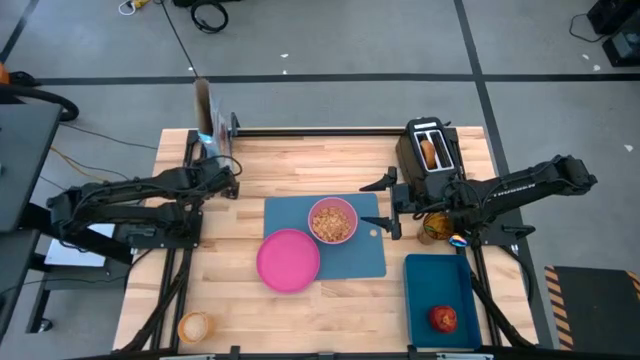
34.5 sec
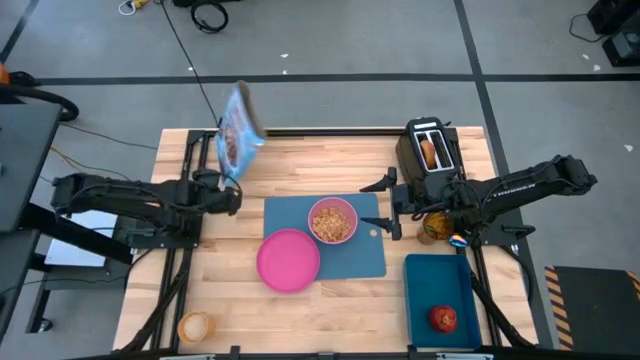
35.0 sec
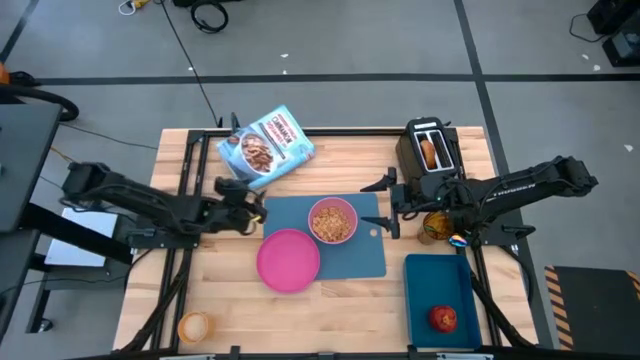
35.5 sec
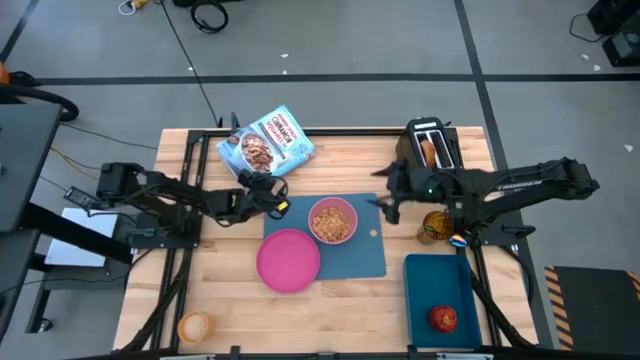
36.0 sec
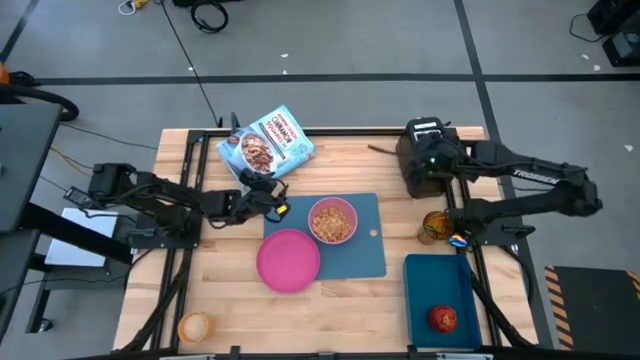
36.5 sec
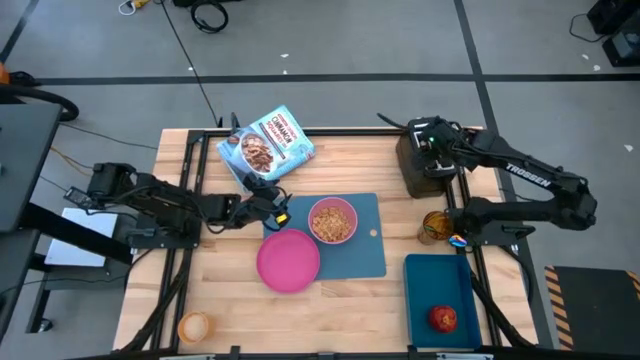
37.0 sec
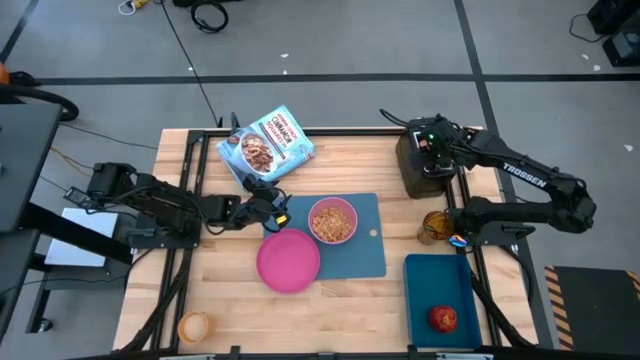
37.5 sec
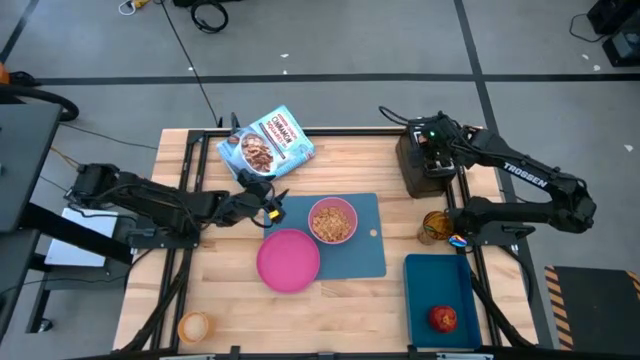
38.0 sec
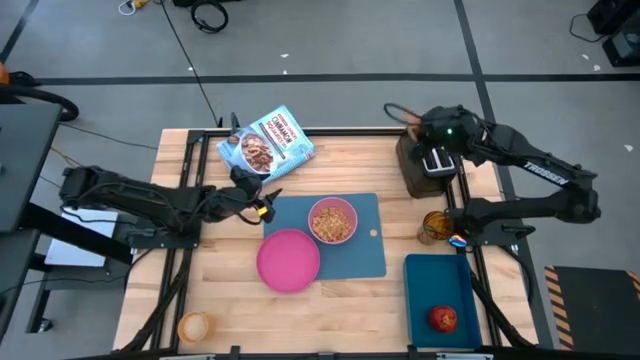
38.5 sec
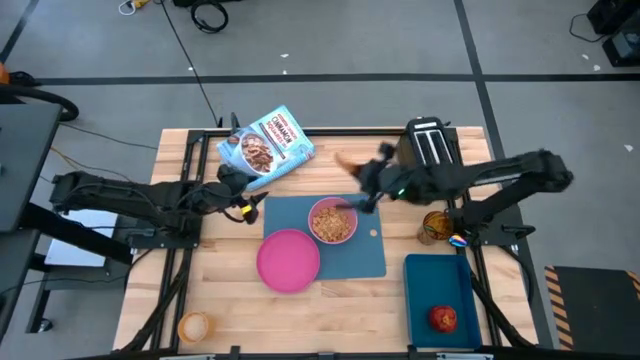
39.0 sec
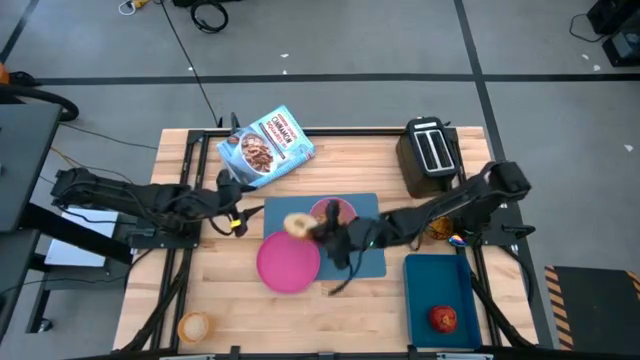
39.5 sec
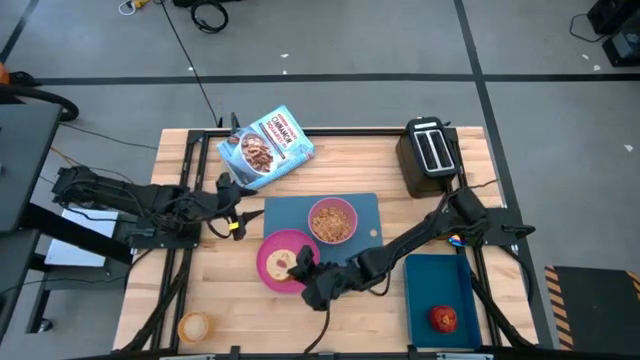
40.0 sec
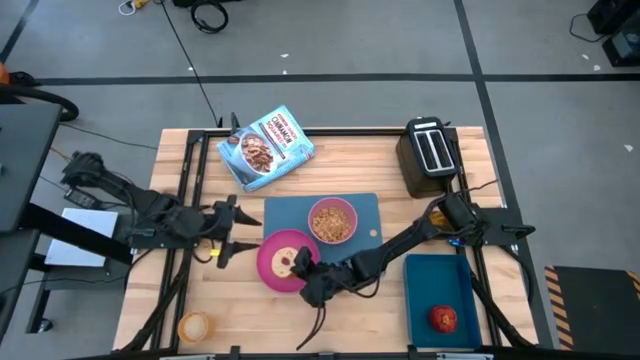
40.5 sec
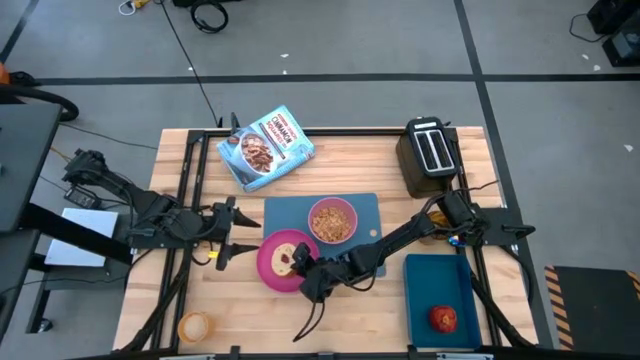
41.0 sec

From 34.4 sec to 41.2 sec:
Task: Arrange a breakfast setting
Put the toasted bread on the pink plate

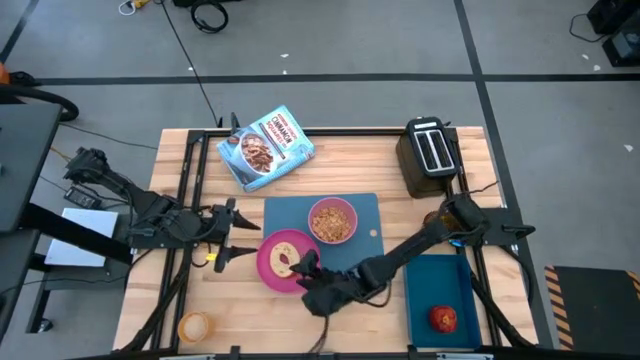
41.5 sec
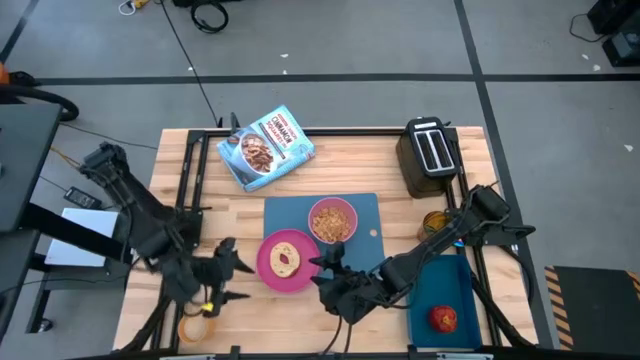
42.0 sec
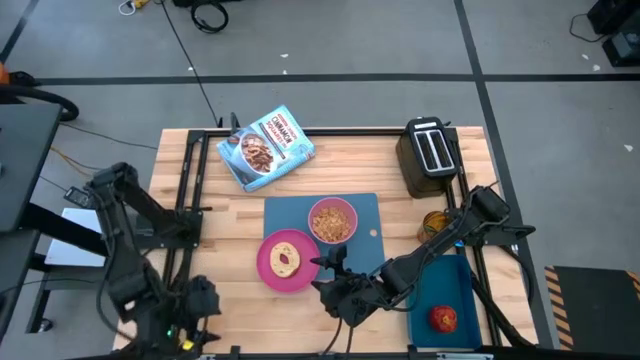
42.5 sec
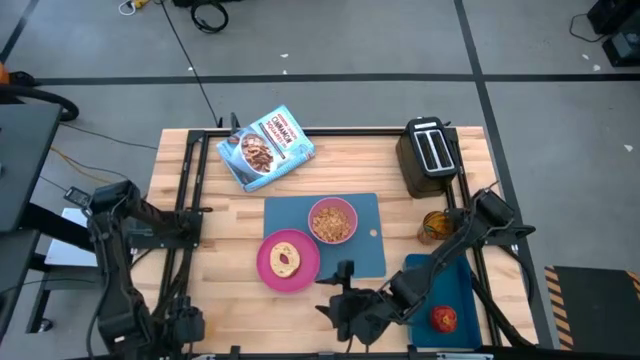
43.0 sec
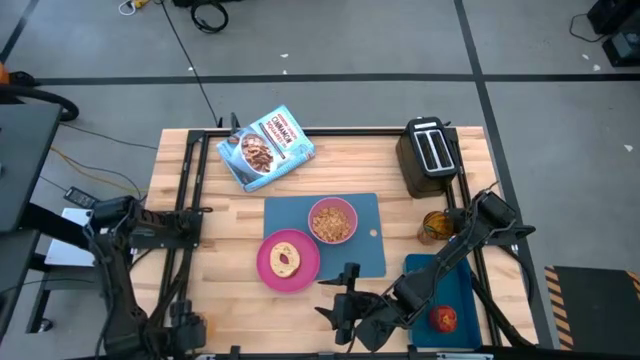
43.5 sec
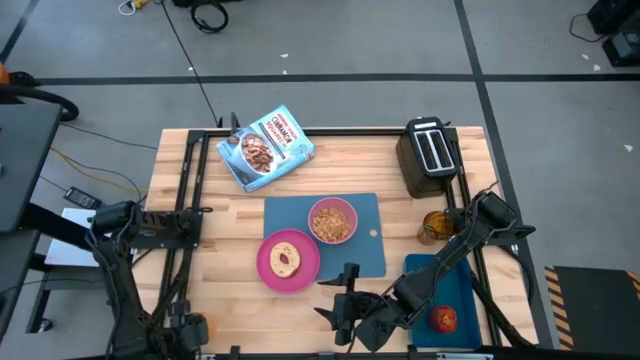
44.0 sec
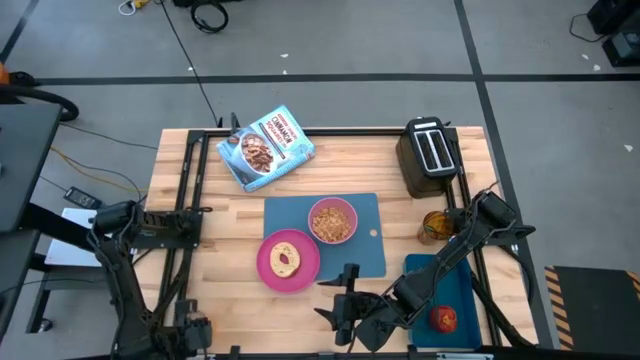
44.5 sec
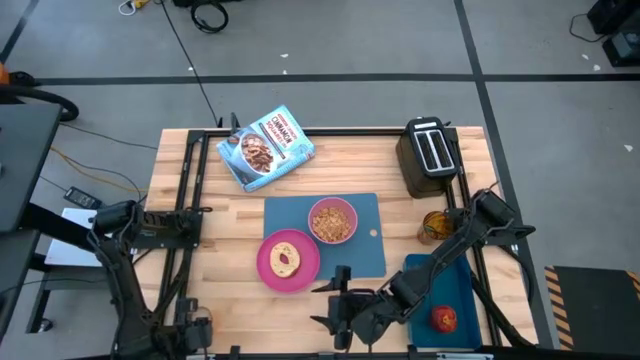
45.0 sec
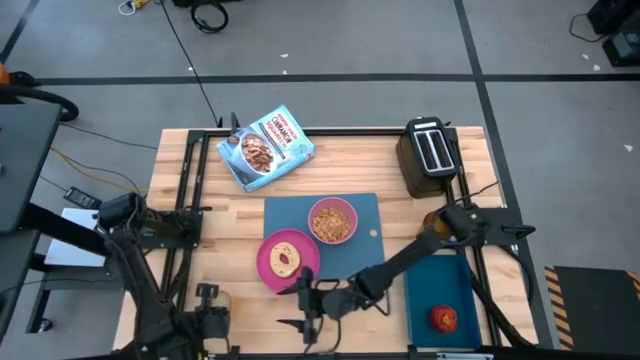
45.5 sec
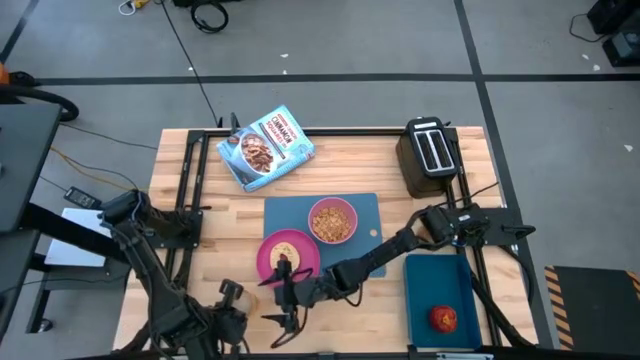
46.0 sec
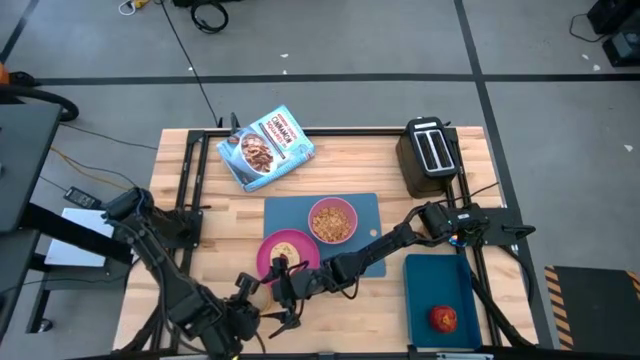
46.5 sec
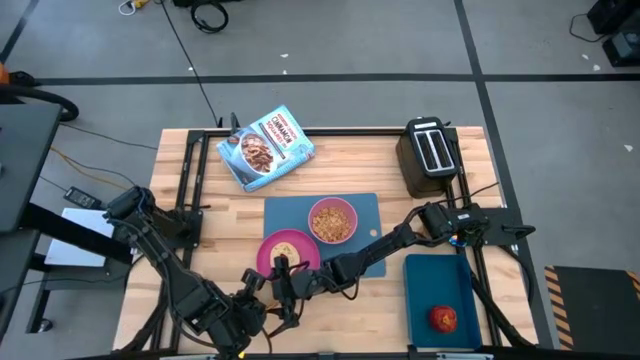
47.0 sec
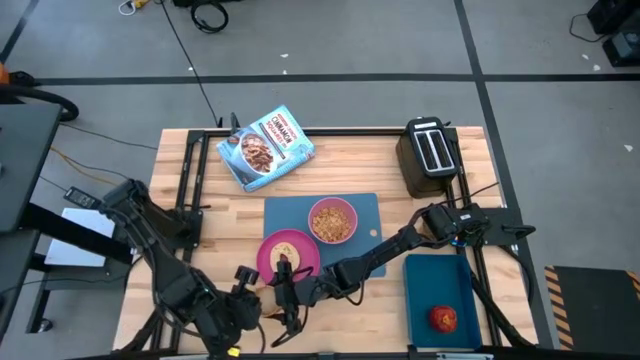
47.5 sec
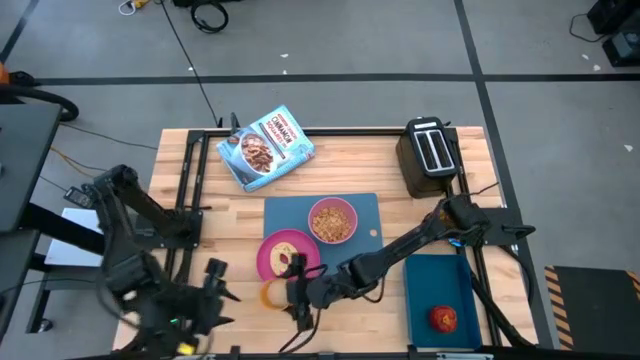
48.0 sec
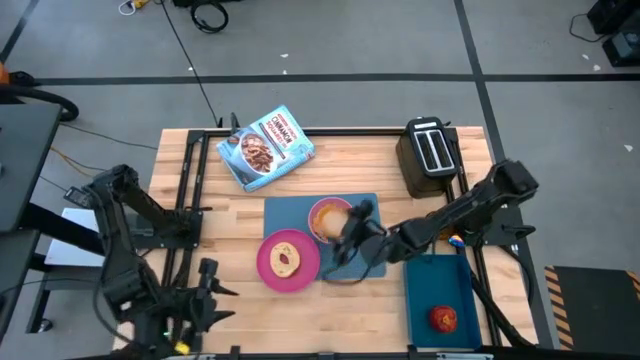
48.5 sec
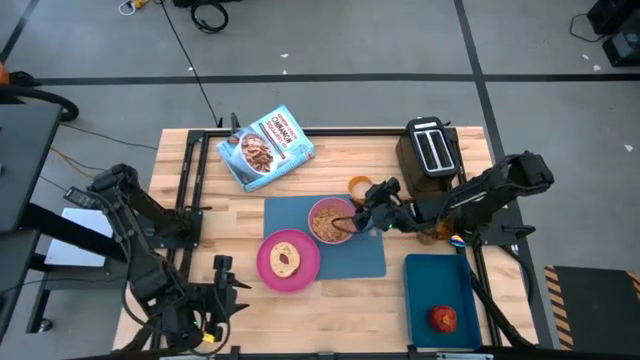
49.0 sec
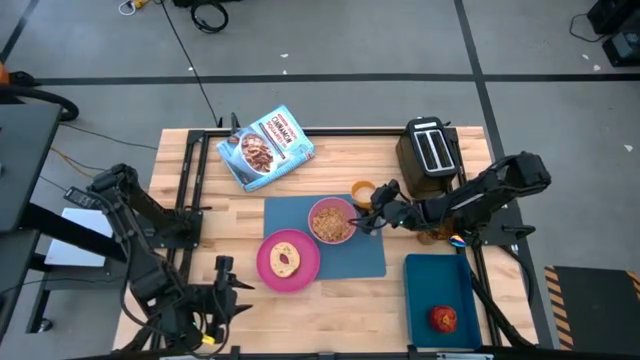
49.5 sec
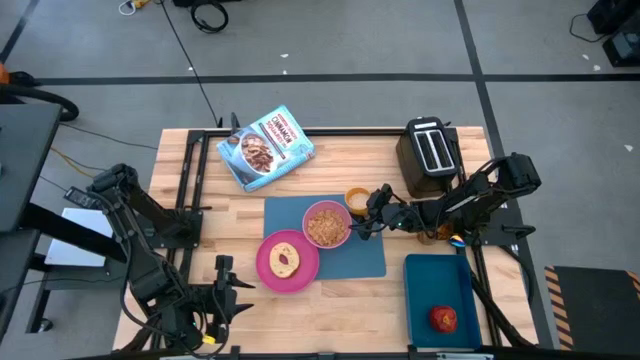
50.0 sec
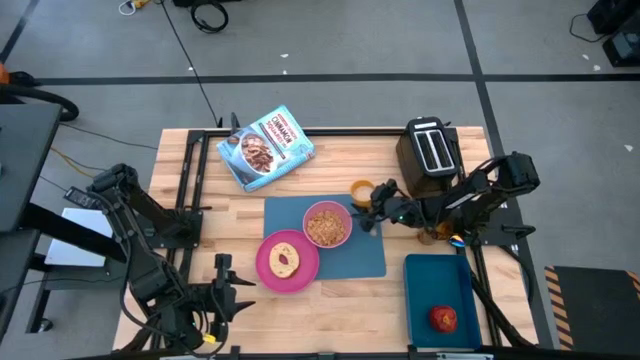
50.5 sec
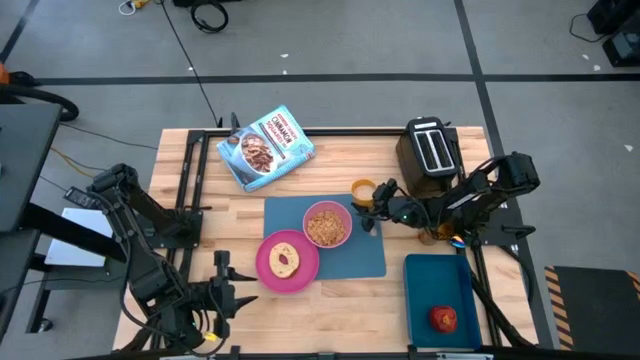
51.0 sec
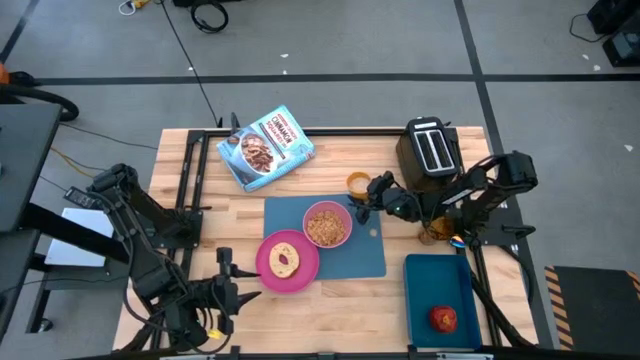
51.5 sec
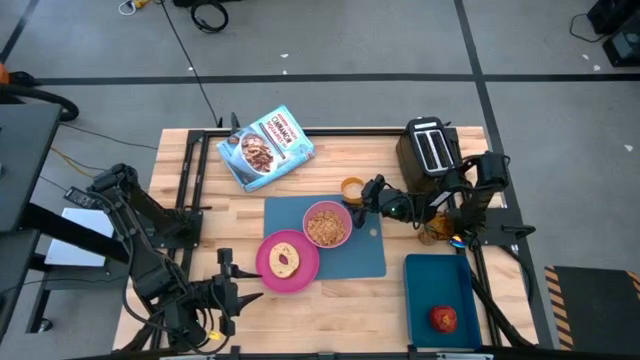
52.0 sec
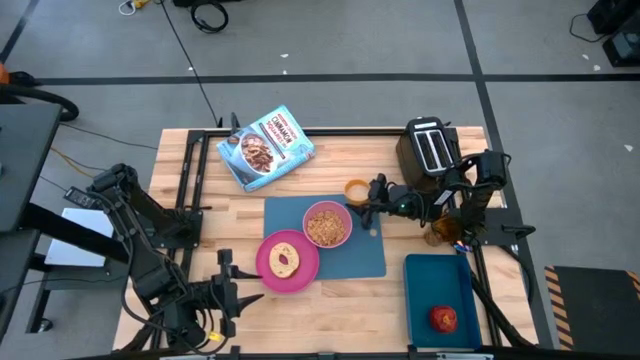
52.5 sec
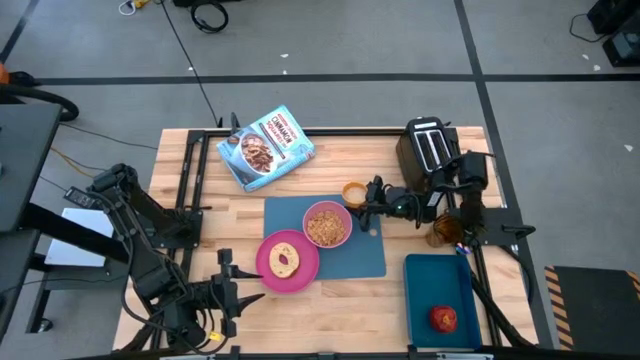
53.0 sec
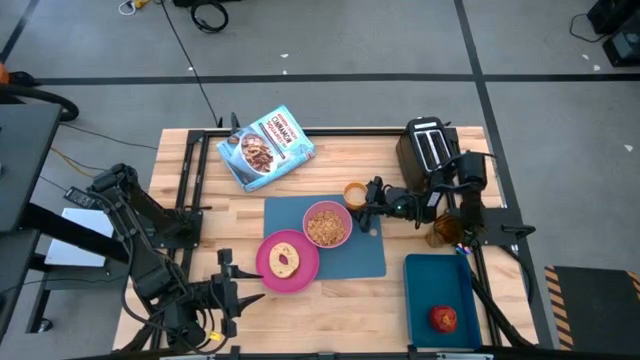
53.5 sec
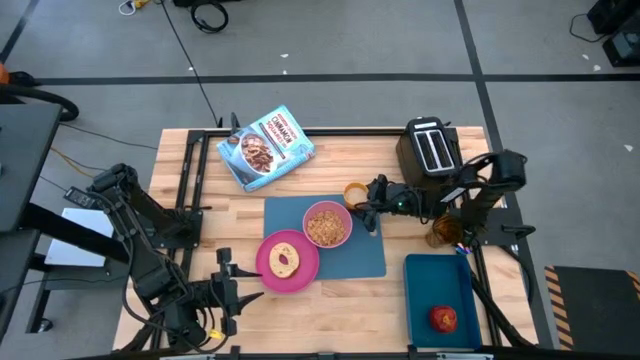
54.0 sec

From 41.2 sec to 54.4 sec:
Put the orange cup on the top right of the blue placemat
